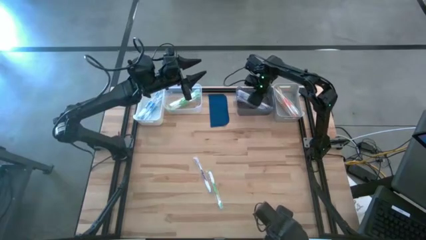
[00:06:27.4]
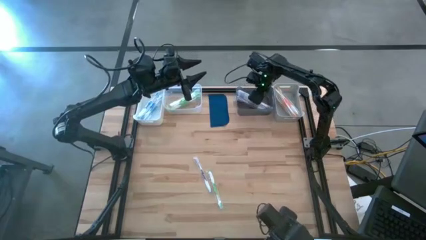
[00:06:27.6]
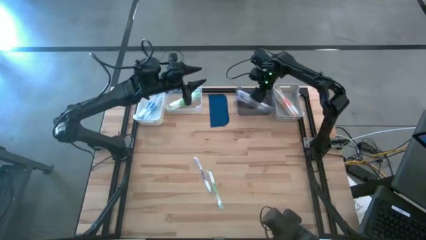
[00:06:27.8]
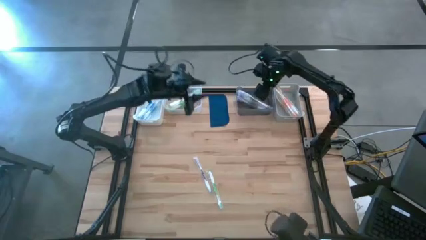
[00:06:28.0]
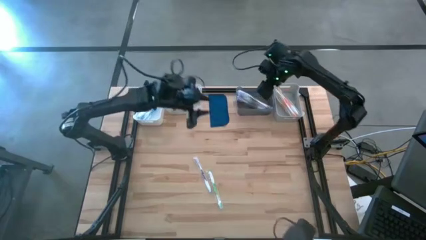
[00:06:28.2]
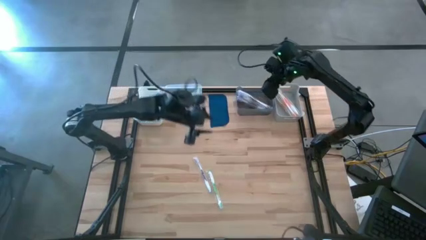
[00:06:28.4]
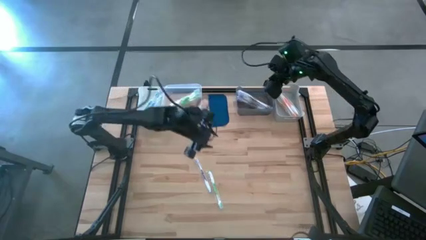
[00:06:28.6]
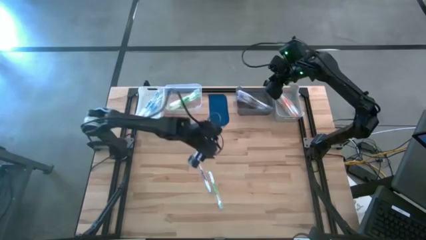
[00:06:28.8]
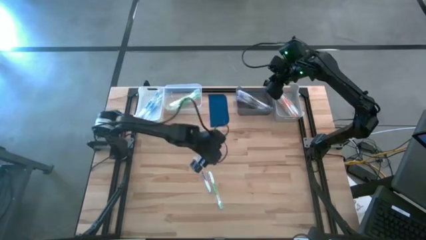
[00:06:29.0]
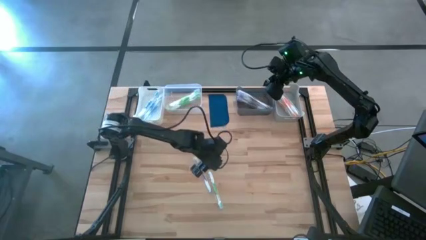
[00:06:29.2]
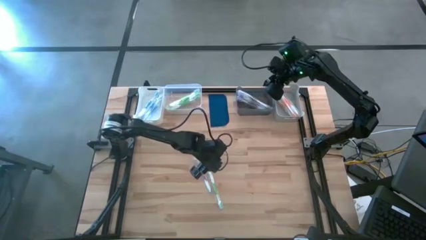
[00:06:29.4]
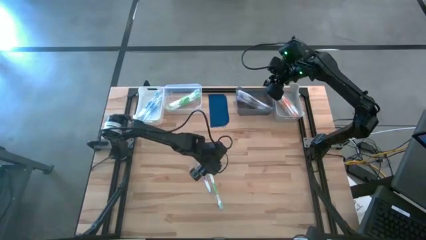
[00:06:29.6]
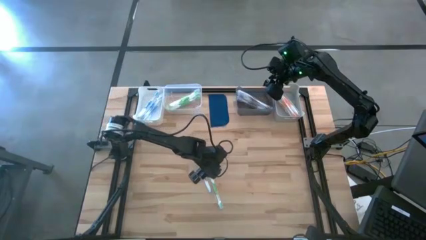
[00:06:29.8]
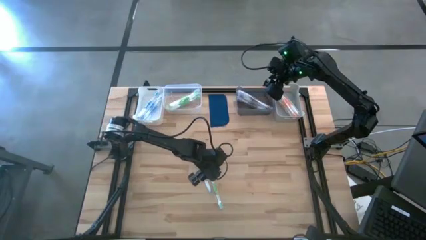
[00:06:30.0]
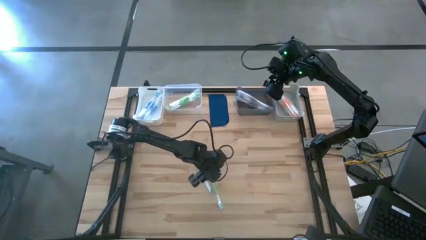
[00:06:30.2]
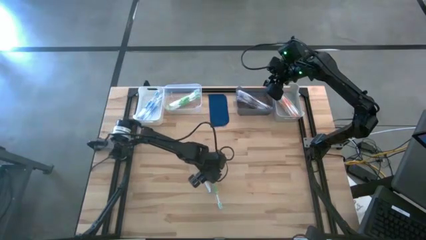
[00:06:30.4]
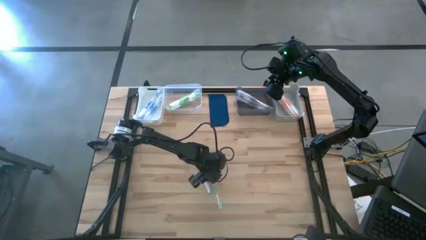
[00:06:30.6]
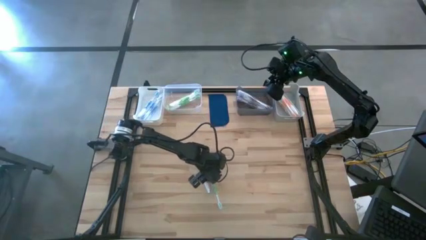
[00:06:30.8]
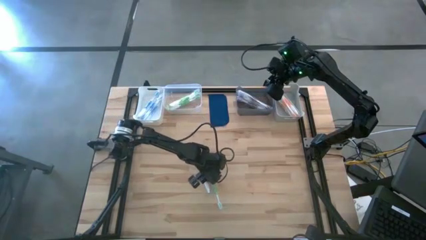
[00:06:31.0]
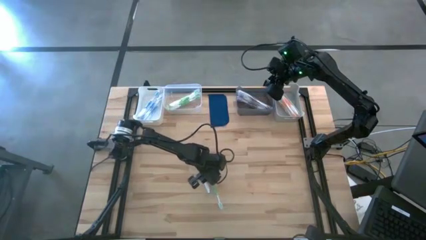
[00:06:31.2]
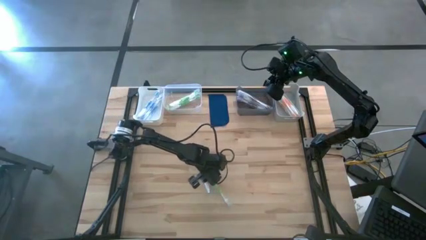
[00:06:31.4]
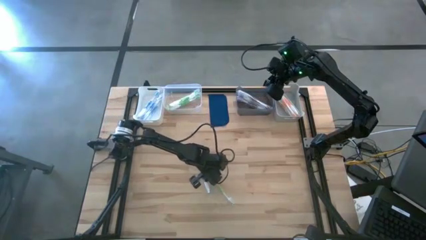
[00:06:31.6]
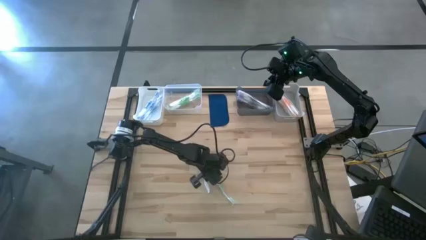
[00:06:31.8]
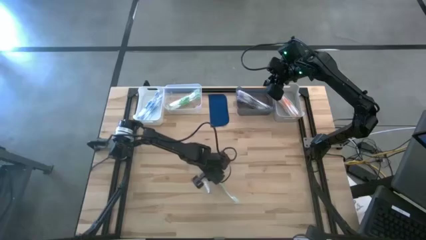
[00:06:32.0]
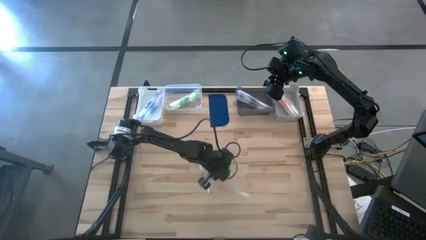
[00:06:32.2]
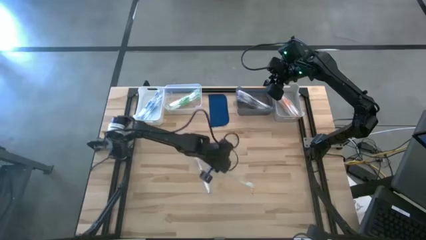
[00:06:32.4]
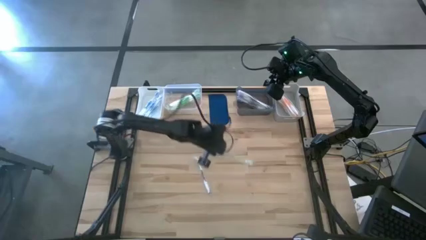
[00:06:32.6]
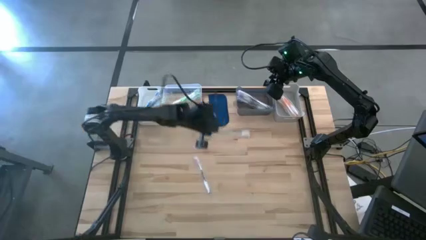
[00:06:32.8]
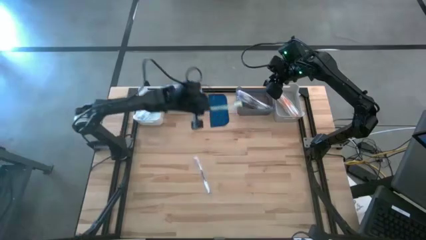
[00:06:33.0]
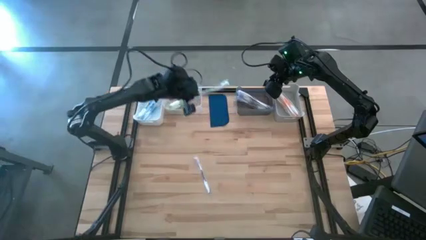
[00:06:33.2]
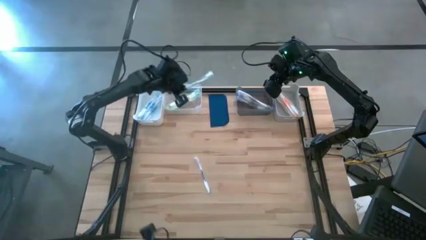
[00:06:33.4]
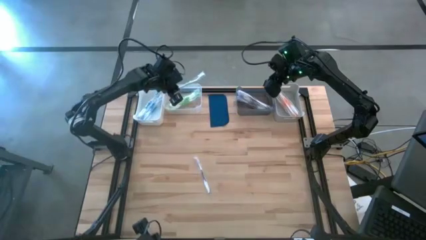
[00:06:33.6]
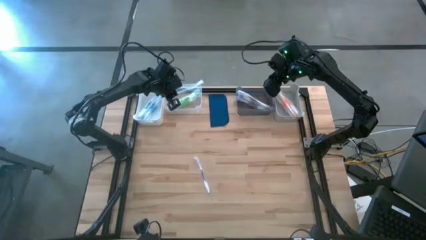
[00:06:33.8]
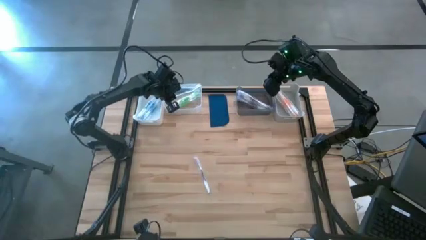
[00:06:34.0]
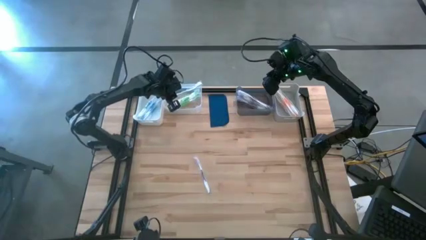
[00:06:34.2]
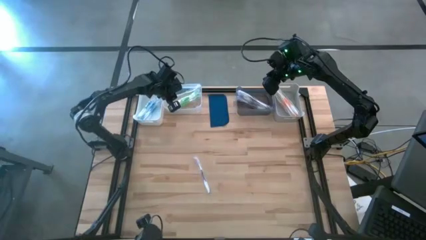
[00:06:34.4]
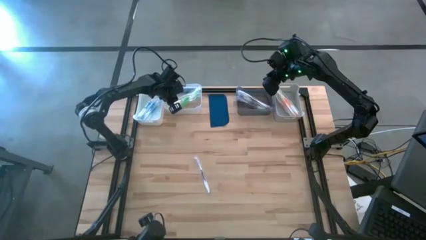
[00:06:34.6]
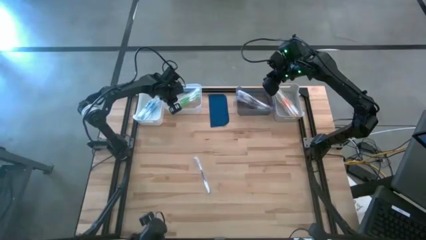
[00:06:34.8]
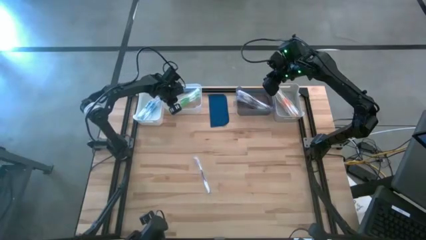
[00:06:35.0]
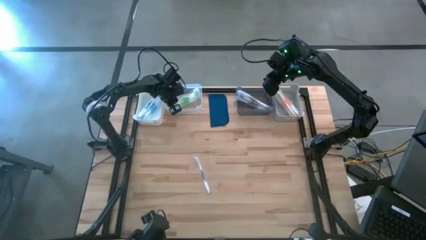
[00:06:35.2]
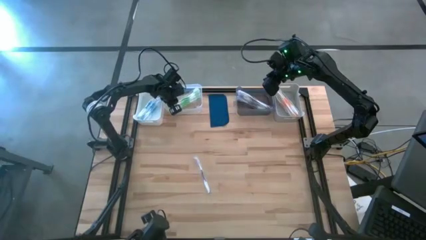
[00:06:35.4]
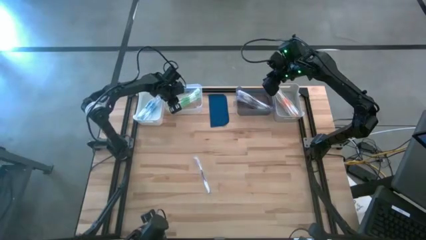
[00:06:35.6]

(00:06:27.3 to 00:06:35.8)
Task: Pick & Place Toothbrushes
Put the green toothbrush into the transparent bin

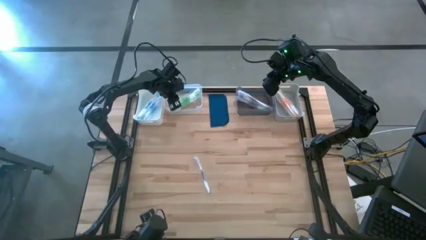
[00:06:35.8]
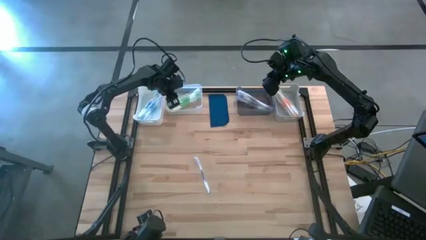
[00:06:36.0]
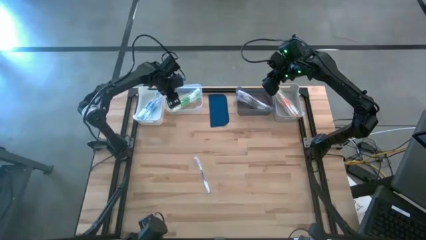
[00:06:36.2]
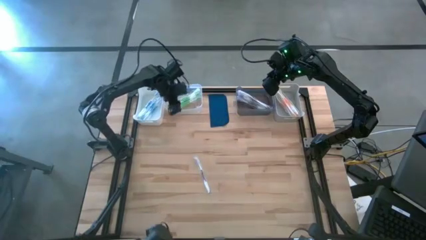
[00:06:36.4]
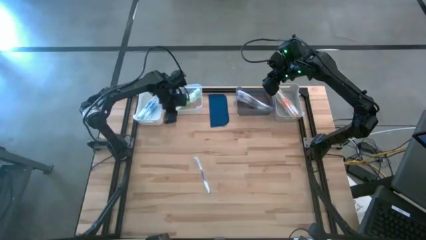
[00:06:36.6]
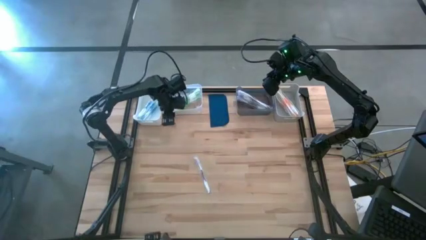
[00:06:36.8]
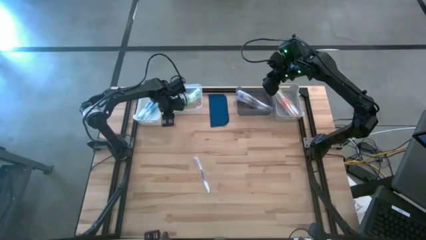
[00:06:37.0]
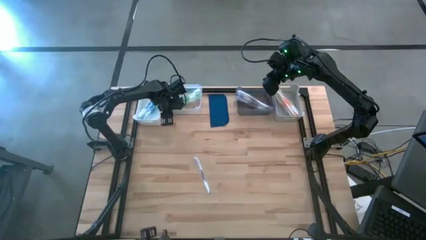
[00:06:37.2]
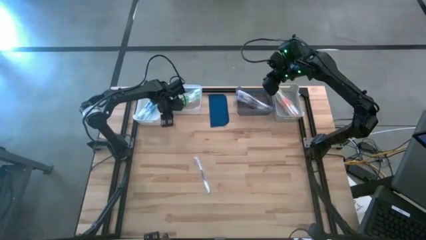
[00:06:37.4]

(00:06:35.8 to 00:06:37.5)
Adjust the transparent bin on the table

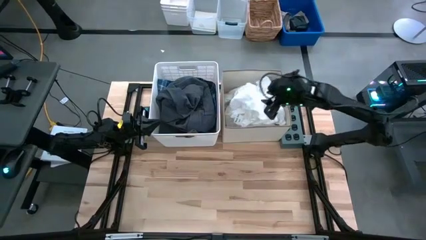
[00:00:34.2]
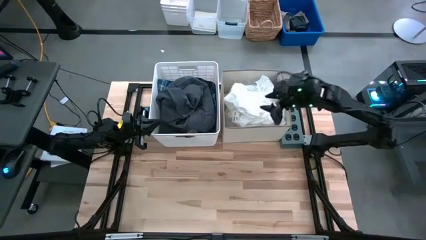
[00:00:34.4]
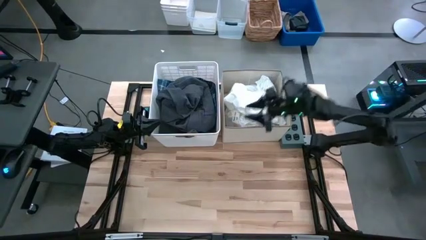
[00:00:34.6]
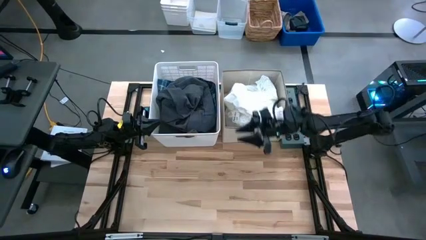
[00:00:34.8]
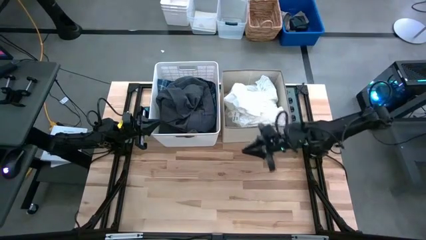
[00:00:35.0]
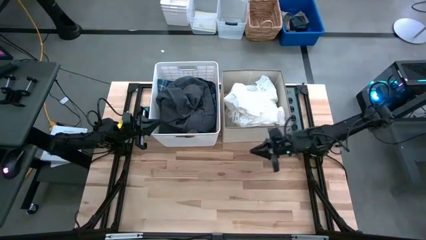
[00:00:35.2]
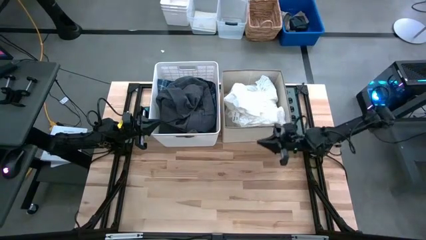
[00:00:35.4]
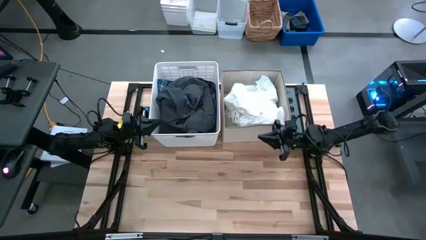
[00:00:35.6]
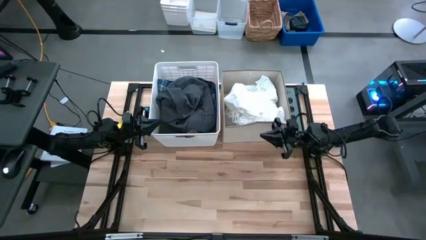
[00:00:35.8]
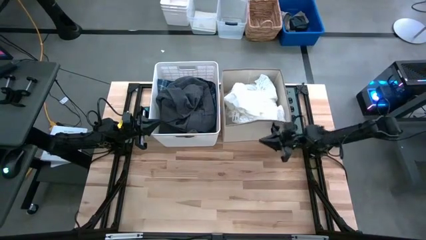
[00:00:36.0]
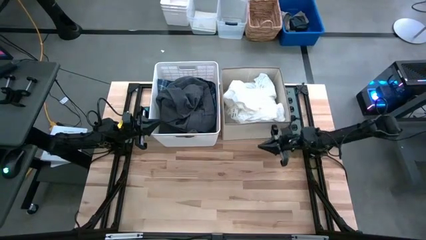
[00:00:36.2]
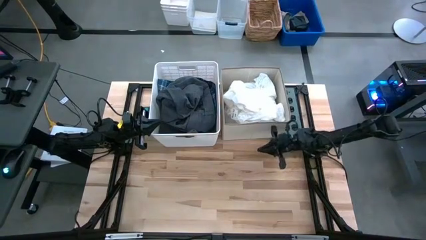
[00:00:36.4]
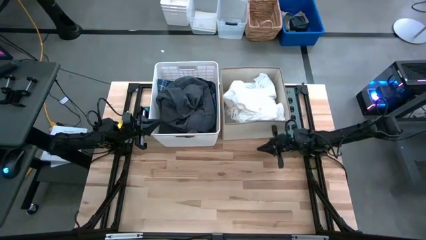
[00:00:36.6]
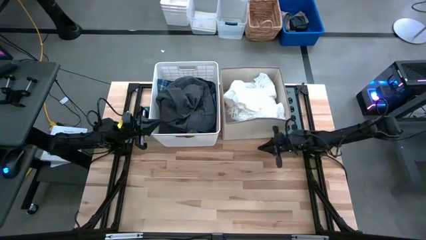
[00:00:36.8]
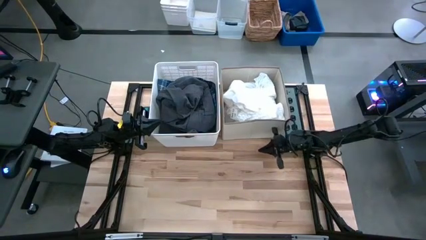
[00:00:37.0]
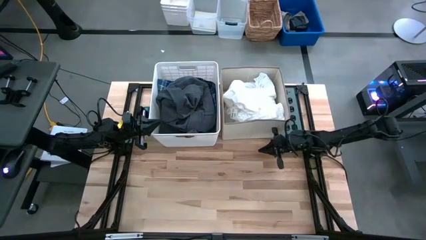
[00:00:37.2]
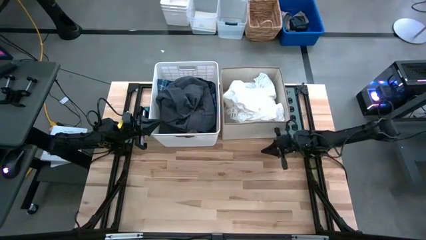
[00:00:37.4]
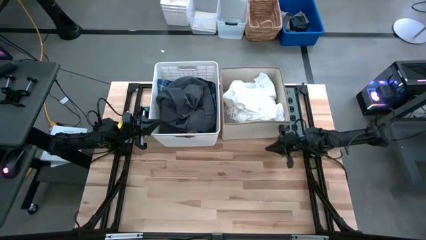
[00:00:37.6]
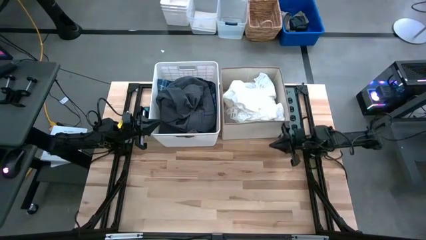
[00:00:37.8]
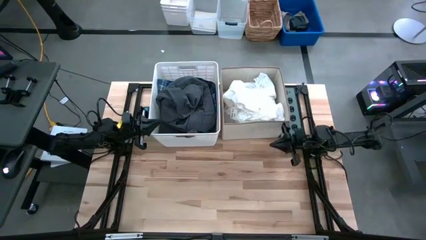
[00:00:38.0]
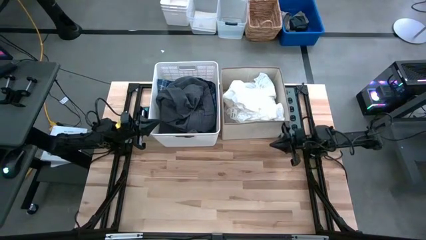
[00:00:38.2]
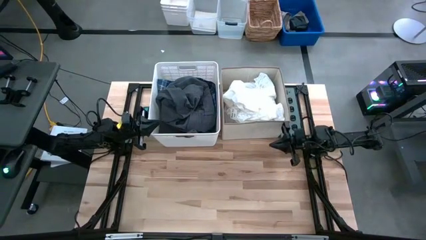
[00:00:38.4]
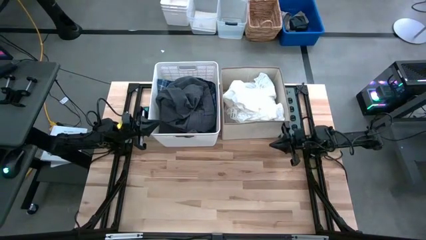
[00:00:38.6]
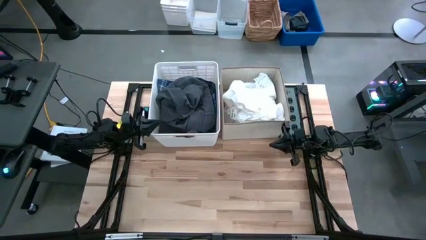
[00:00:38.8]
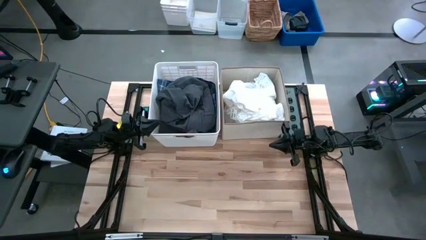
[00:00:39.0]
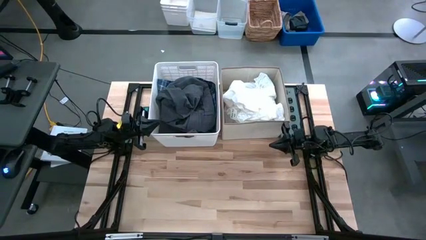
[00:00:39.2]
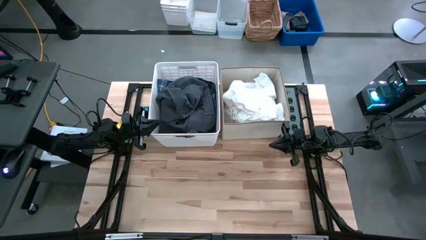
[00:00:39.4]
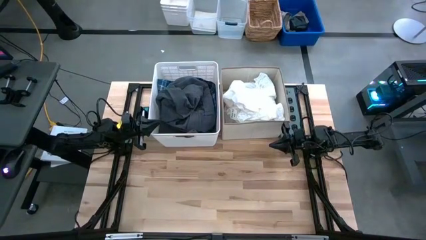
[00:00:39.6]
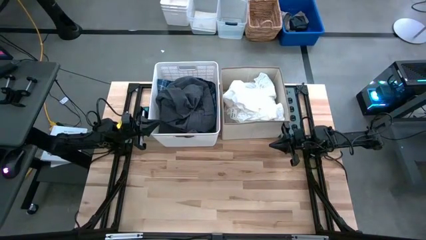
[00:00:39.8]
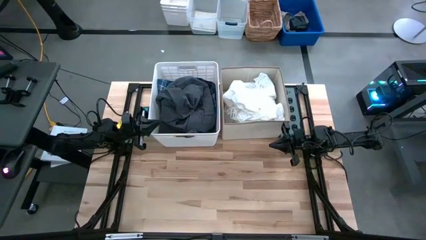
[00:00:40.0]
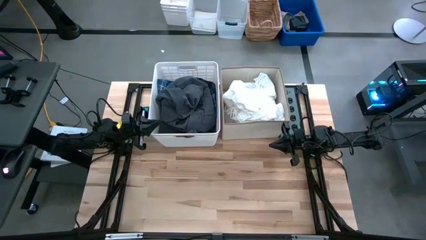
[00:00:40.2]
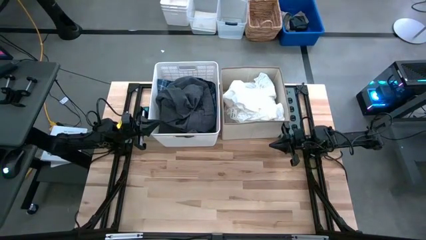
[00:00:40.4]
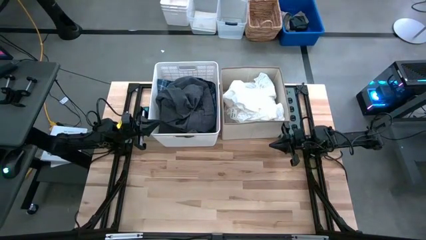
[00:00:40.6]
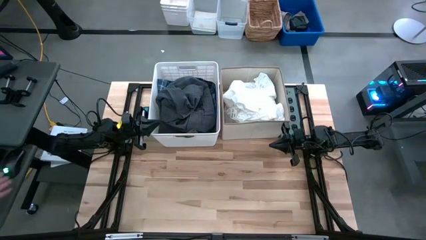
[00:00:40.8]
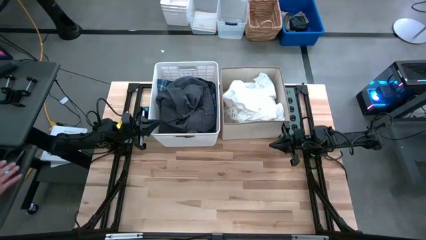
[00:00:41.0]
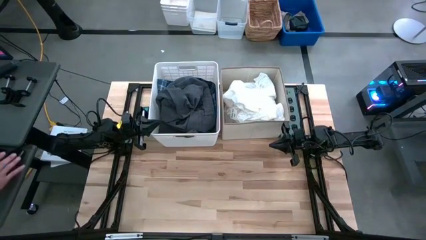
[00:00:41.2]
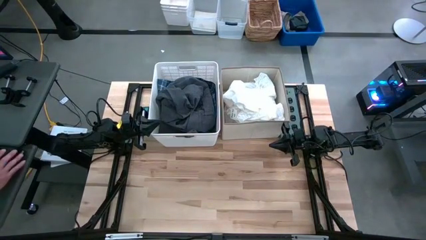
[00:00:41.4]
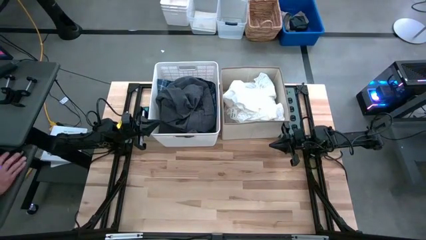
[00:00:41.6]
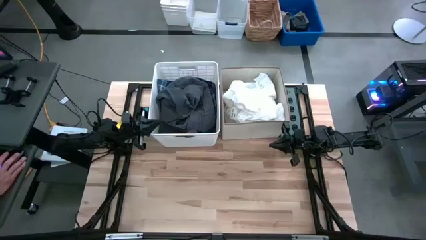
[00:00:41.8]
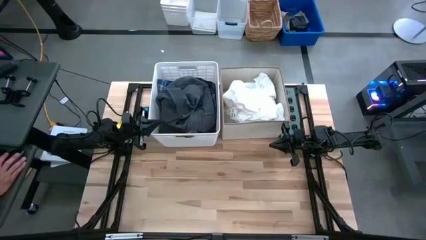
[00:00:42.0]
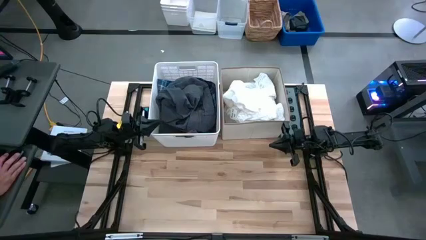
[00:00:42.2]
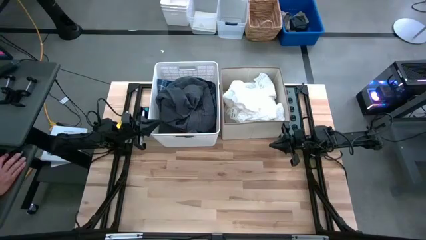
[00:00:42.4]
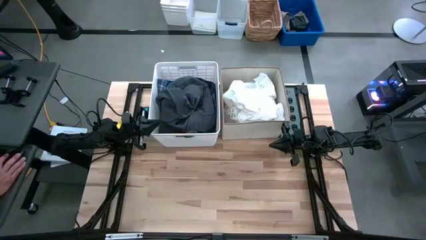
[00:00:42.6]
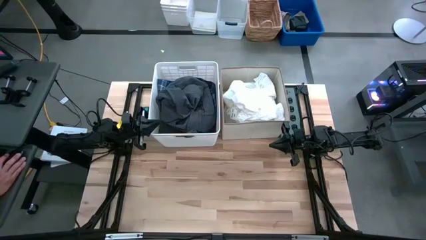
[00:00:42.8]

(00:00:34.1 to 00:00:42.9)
Task: Sort clothes
Return to Home Position
